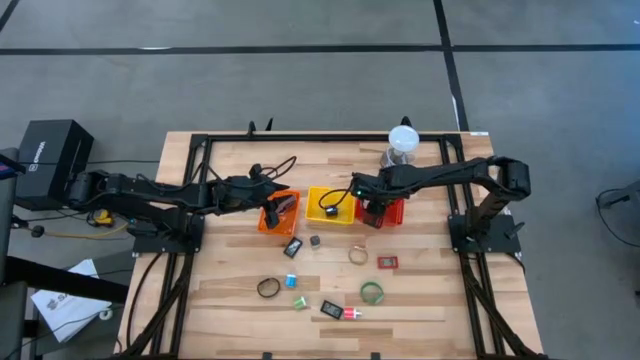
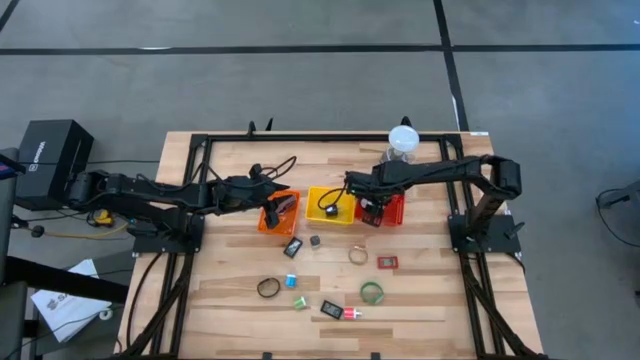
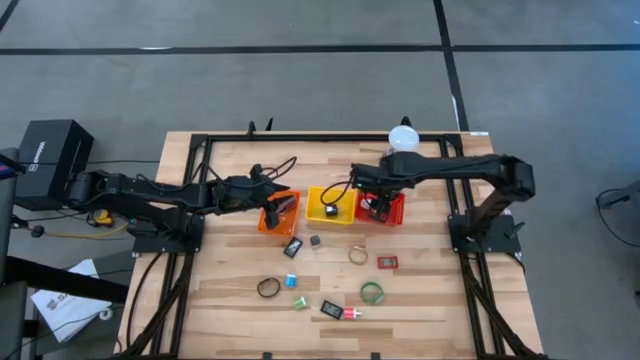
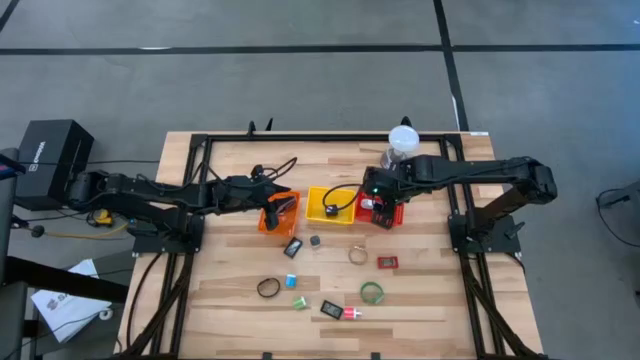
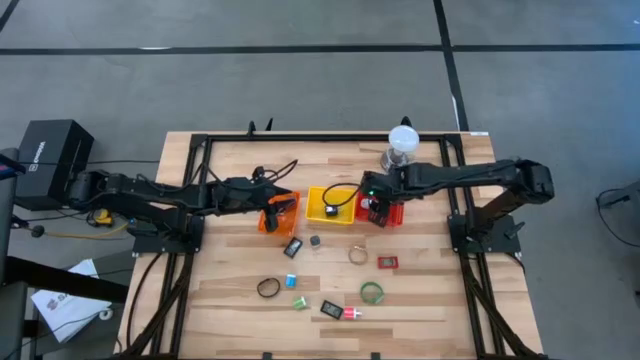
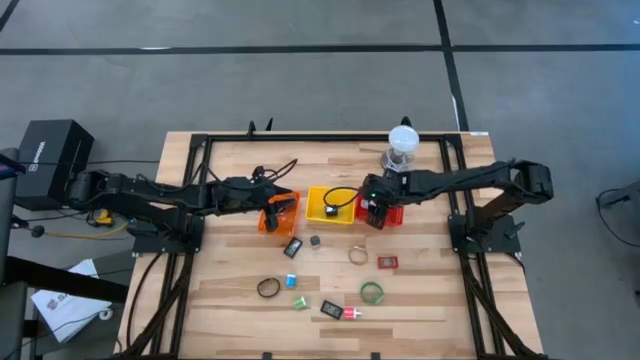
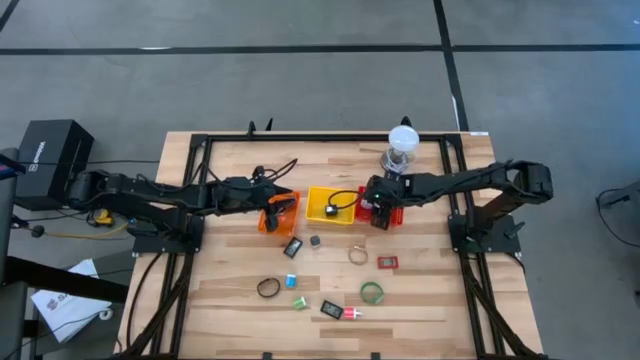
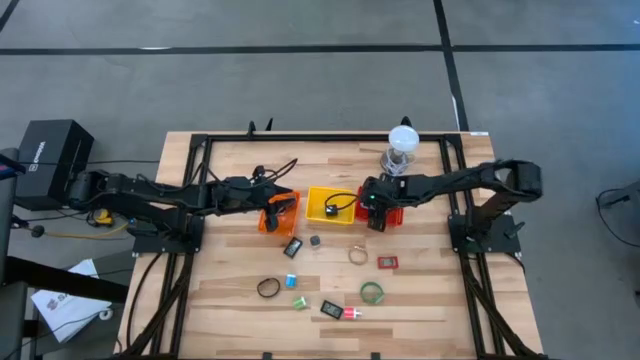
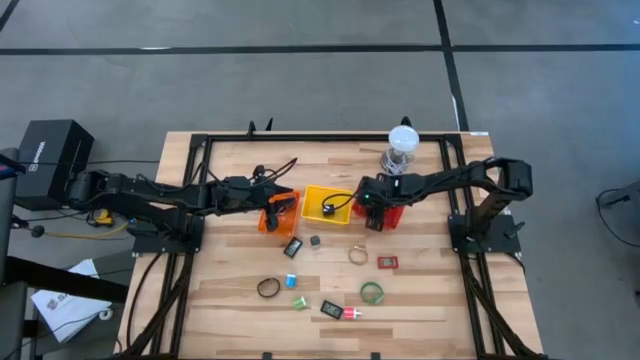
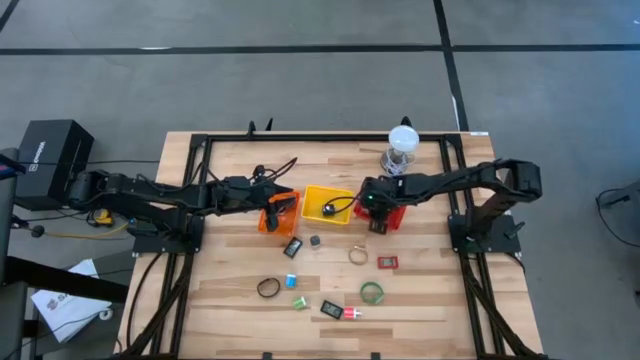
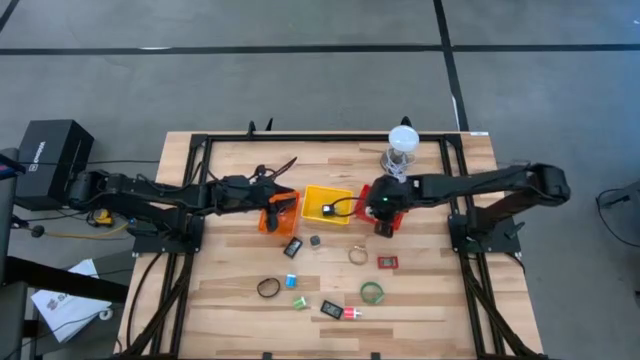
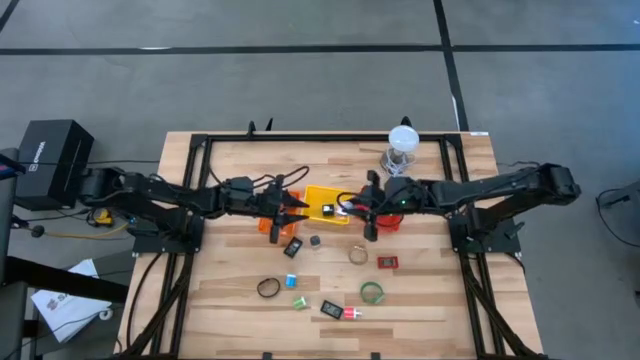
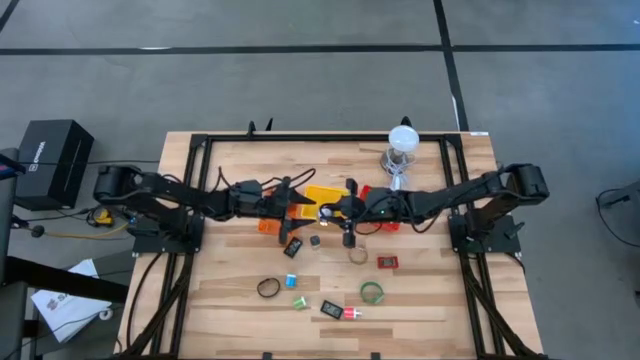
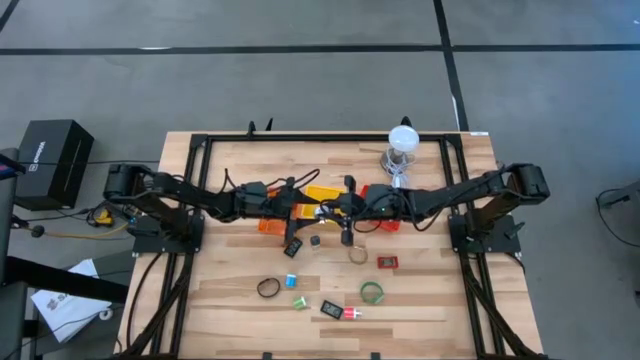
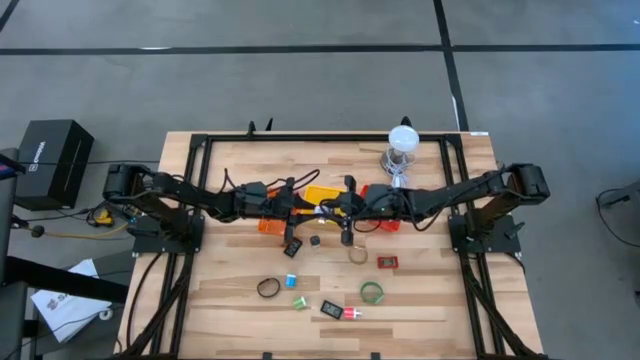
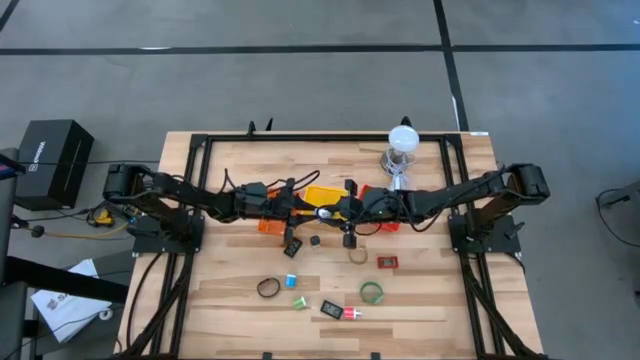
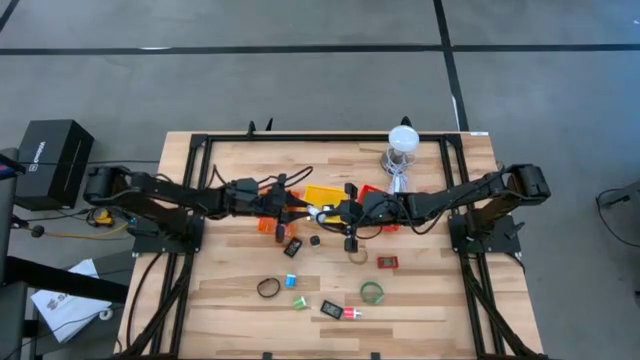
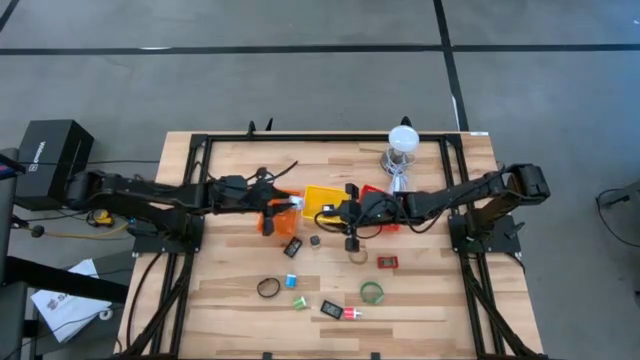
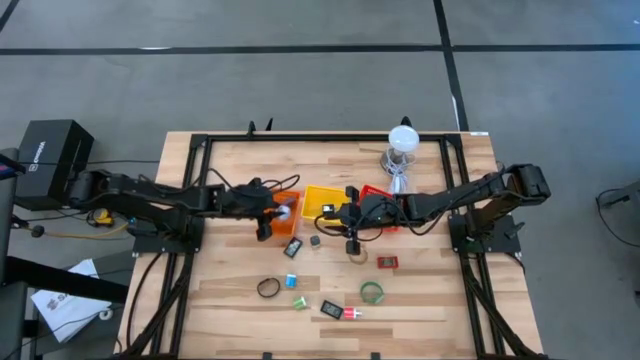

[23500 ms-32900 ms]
Task: Pick & Place Office items
Put the white wristwatch into the orange bin

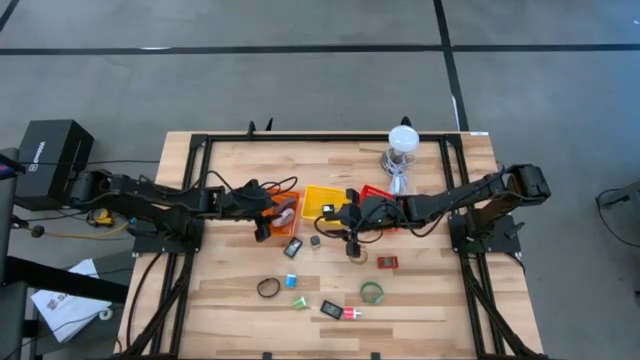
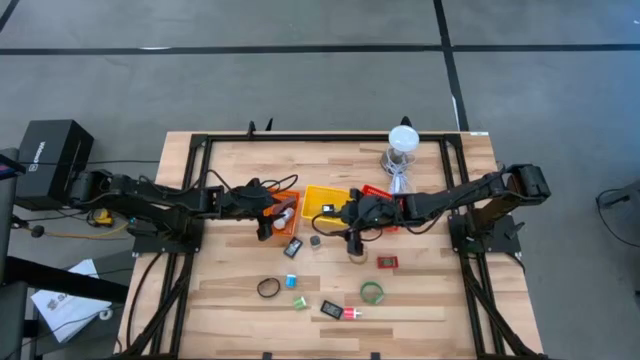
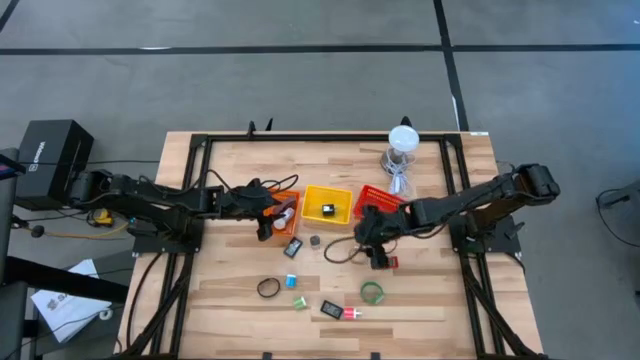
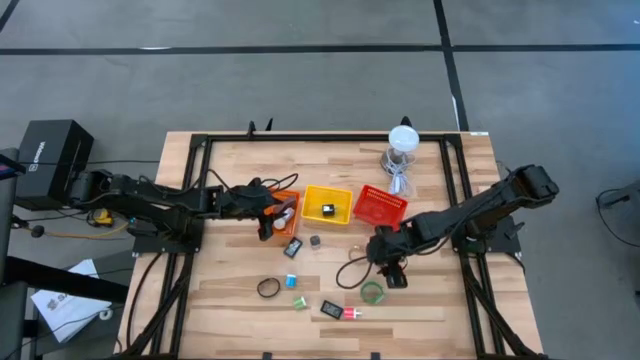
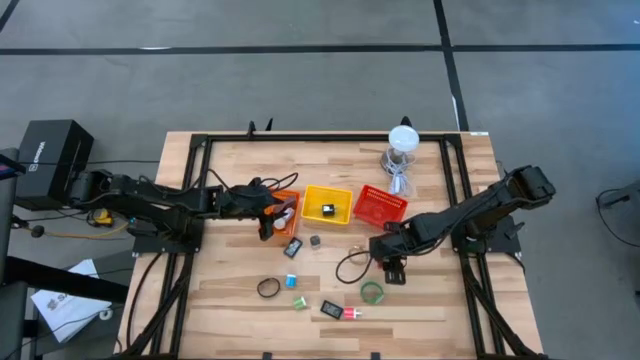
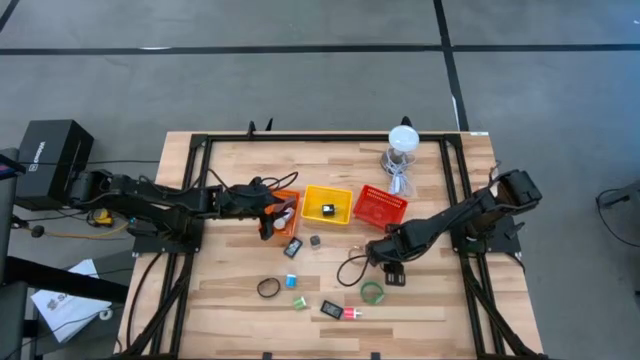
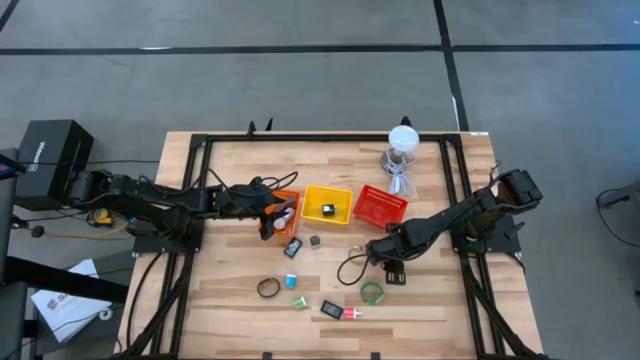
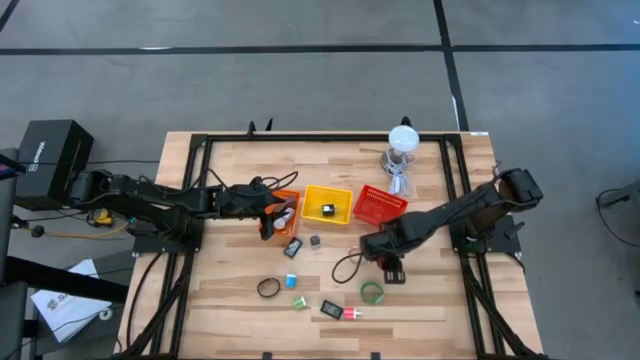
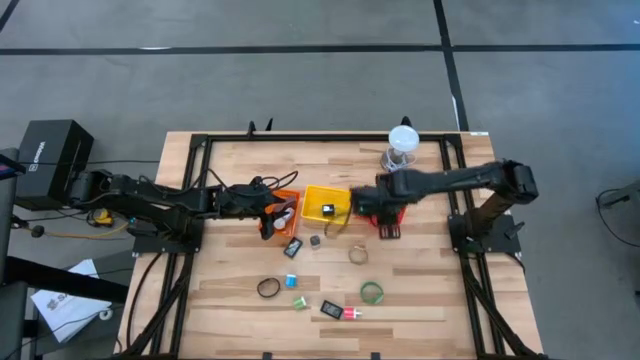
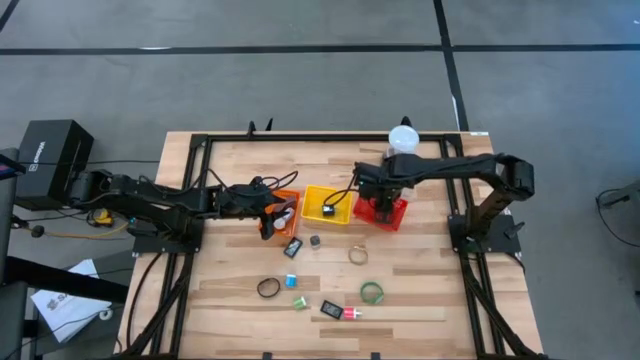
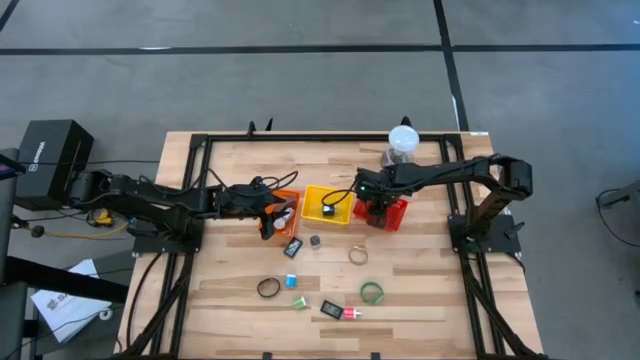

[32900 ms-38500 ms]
Put the red digital timer into the red bin

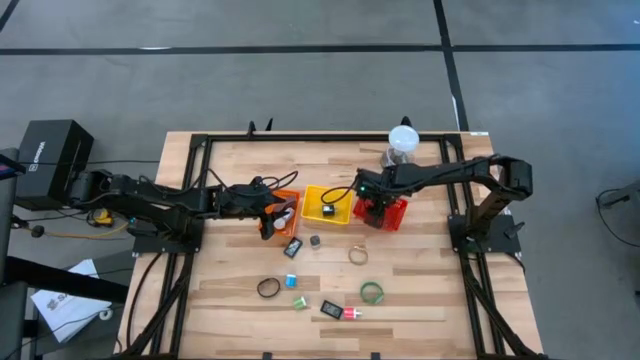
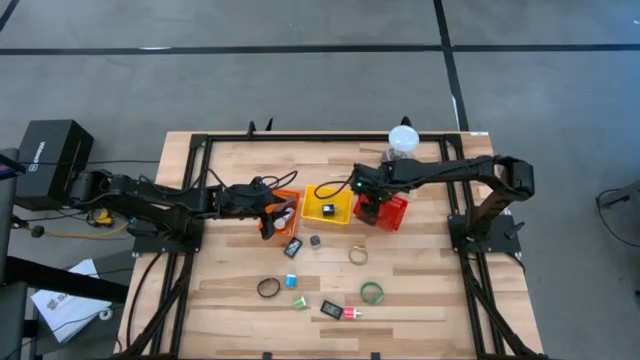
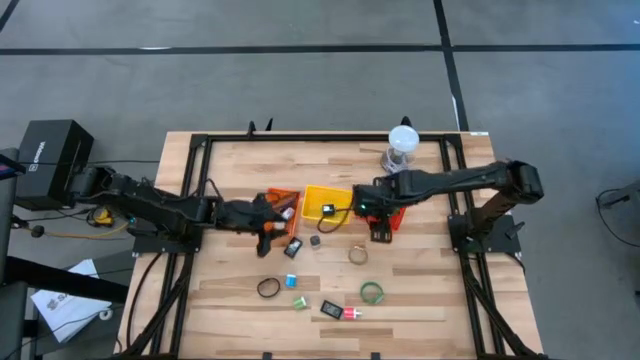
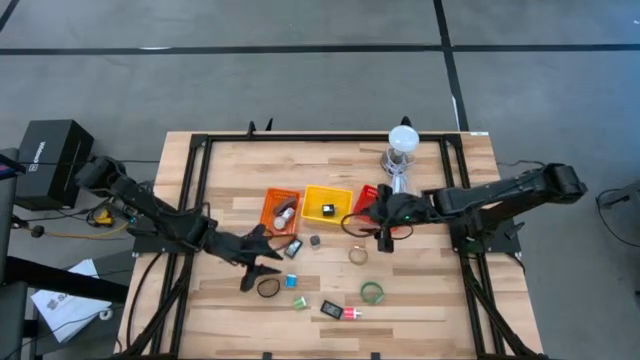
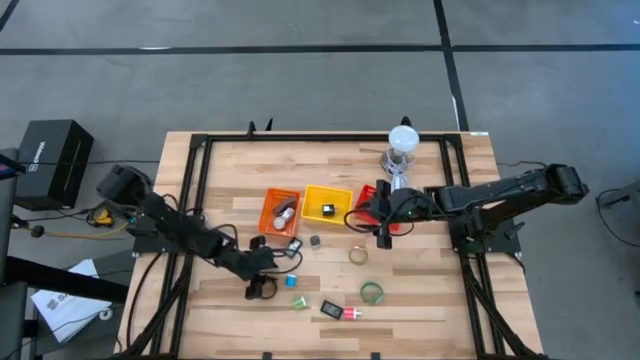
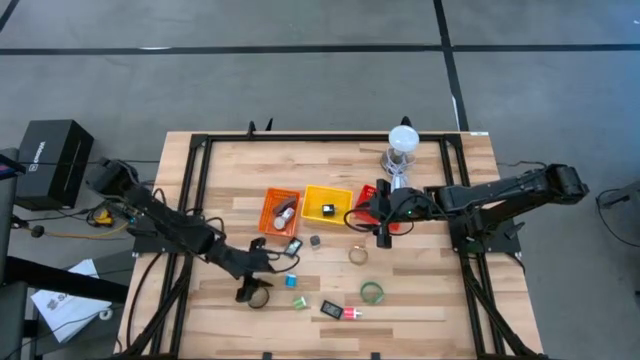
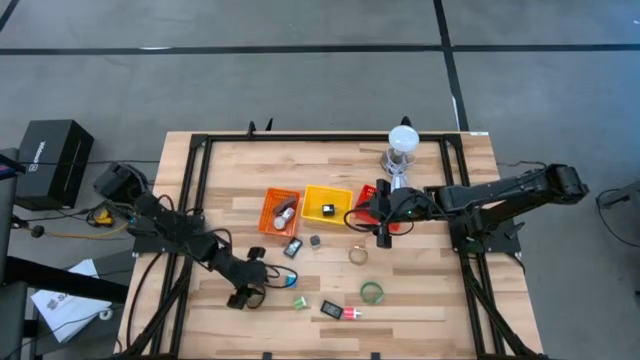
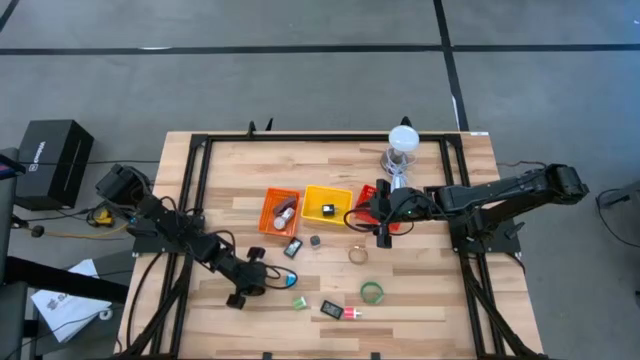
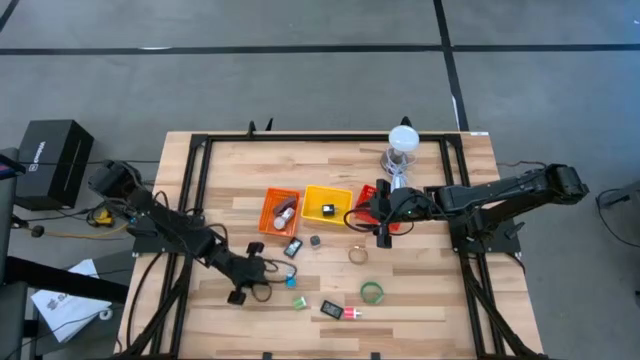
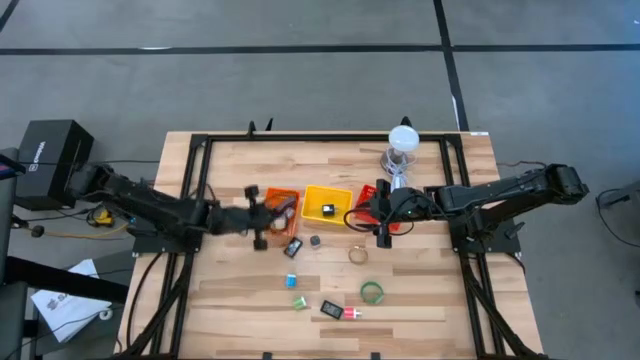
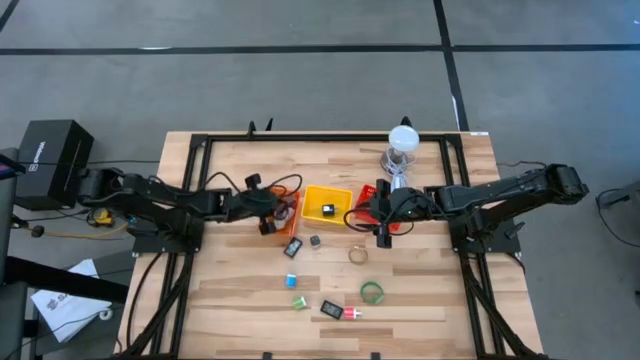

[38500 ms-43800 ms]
Put the black wristwatch into the orange bin

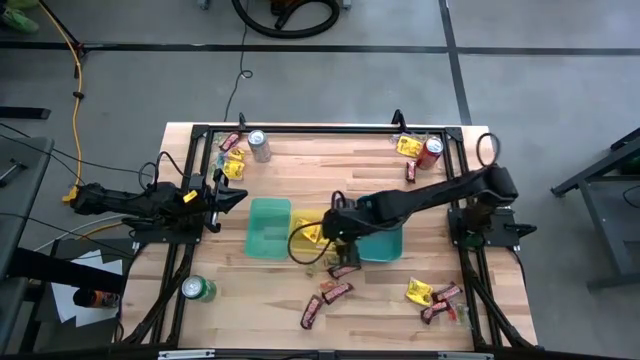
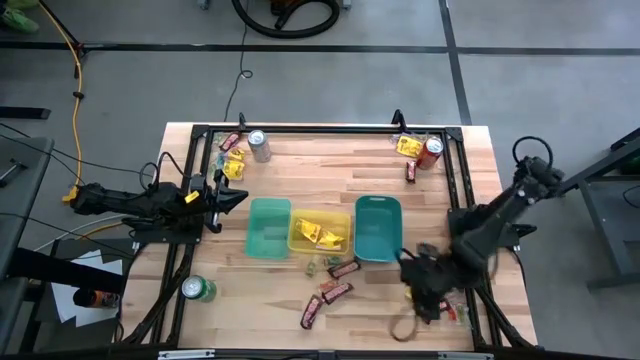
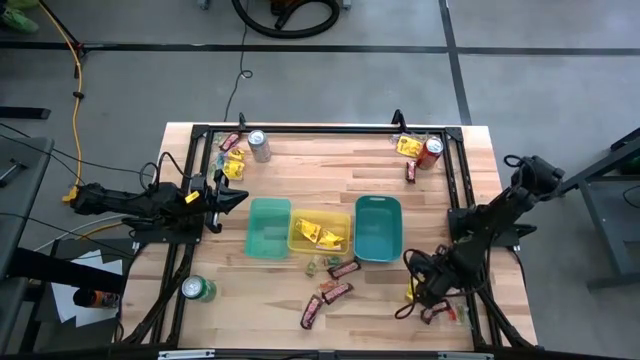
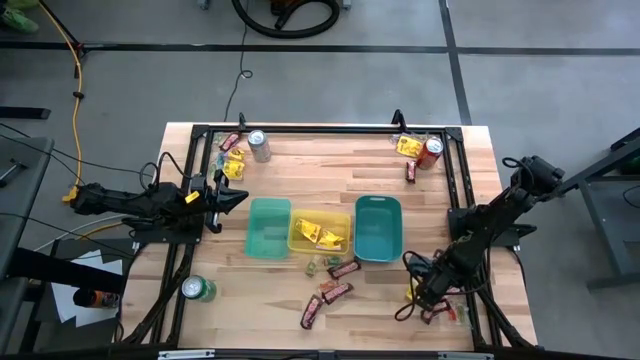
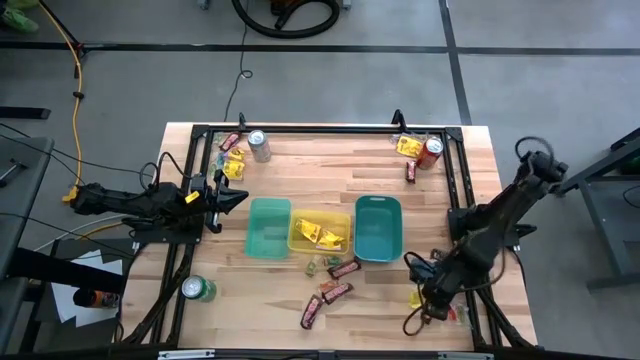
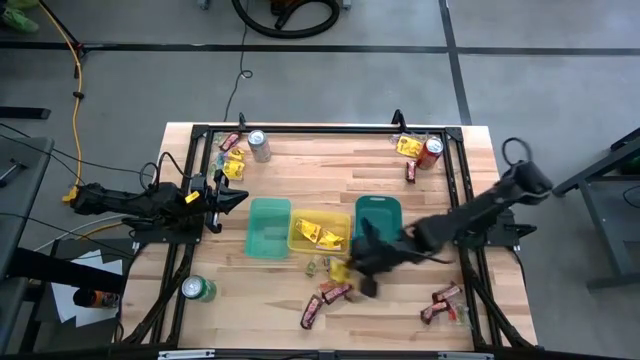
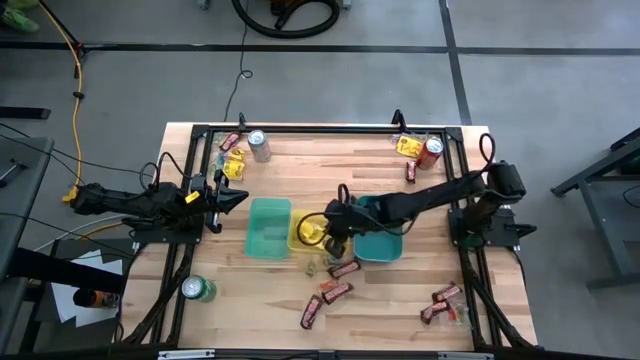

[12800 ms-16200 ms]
Task: Sort candy
Put the yellow candy into the yellow bin
